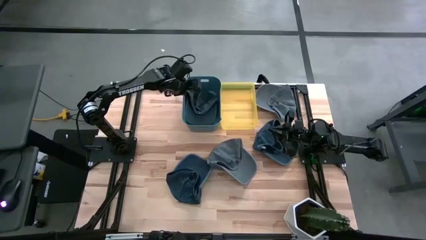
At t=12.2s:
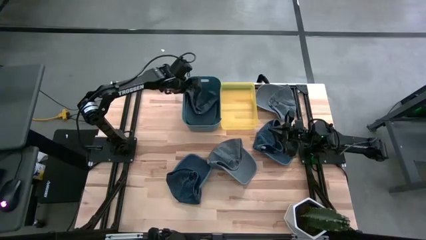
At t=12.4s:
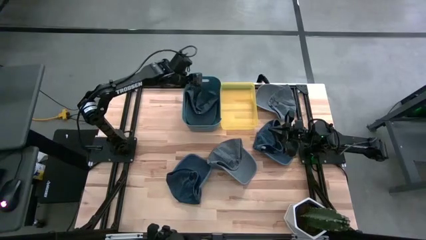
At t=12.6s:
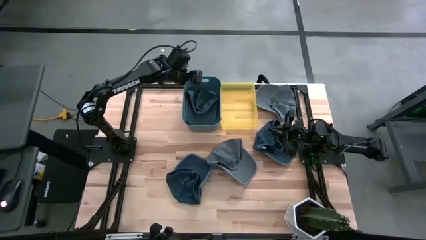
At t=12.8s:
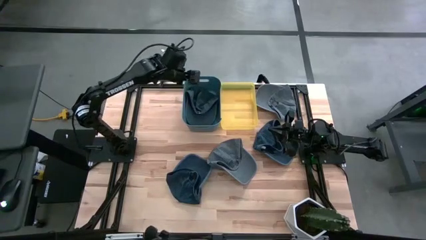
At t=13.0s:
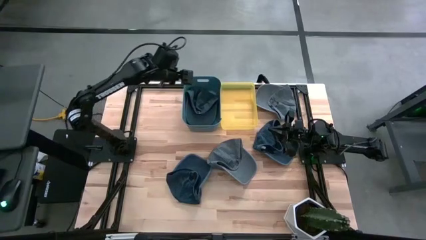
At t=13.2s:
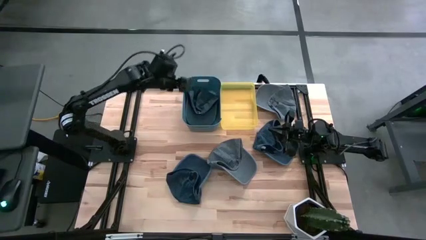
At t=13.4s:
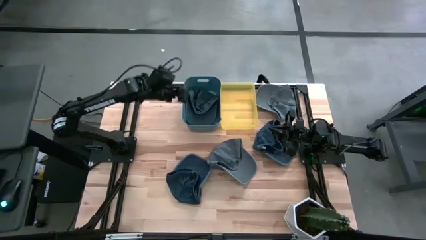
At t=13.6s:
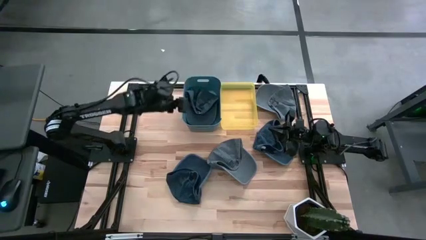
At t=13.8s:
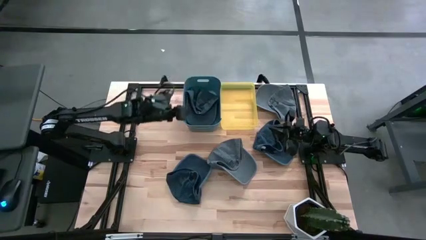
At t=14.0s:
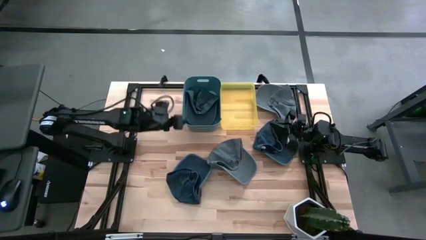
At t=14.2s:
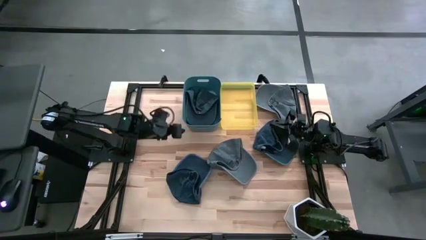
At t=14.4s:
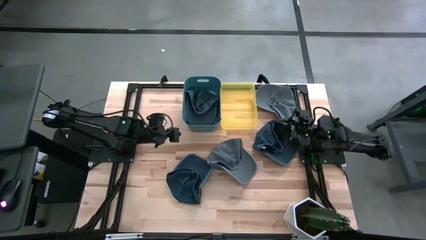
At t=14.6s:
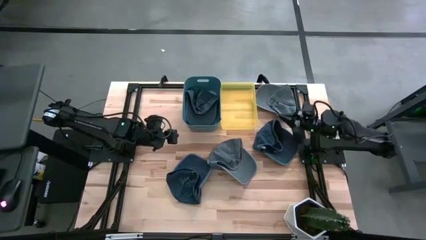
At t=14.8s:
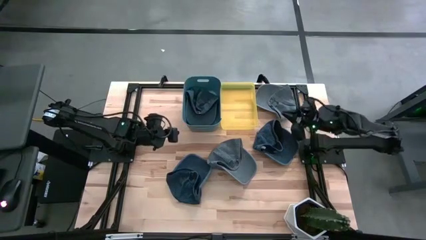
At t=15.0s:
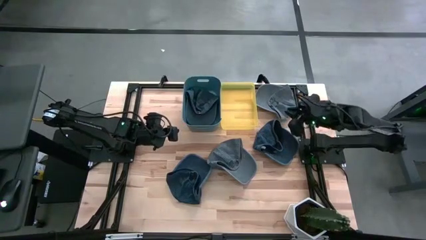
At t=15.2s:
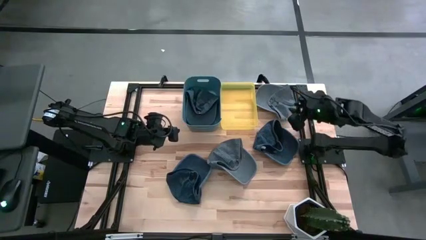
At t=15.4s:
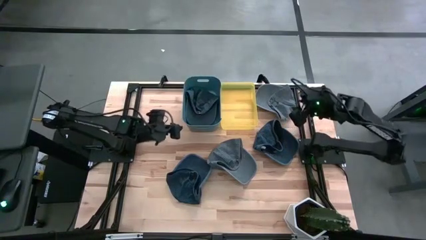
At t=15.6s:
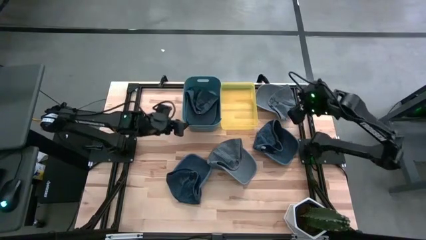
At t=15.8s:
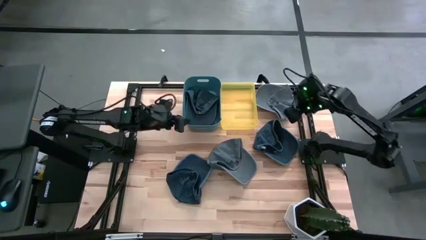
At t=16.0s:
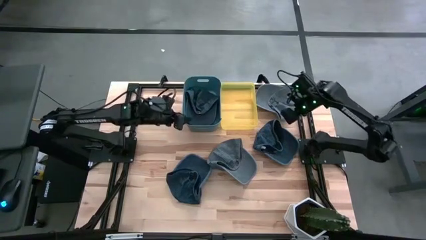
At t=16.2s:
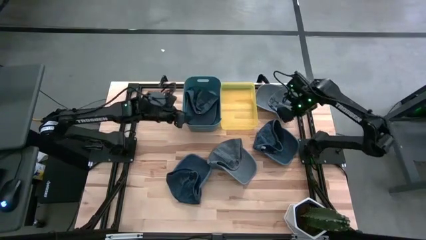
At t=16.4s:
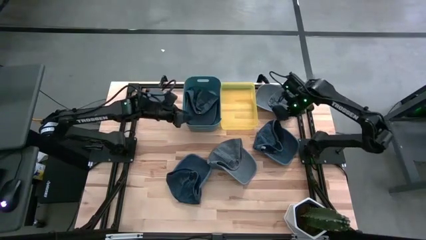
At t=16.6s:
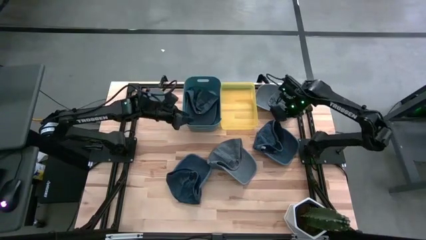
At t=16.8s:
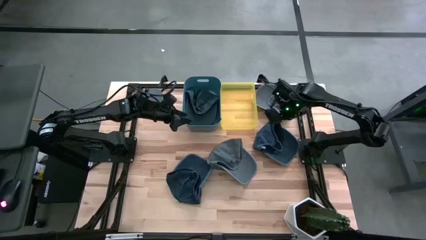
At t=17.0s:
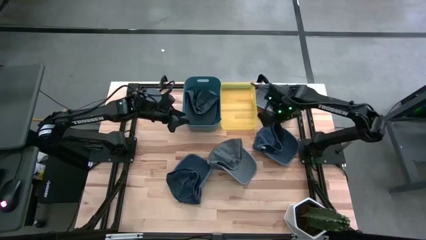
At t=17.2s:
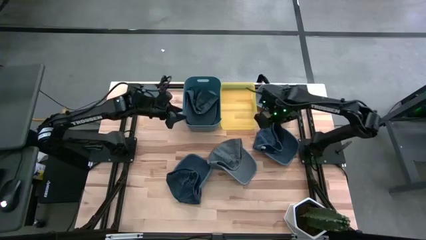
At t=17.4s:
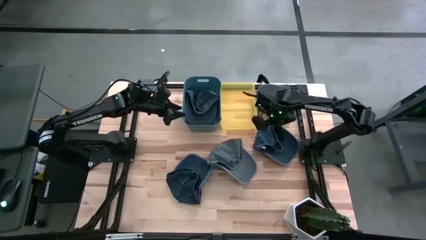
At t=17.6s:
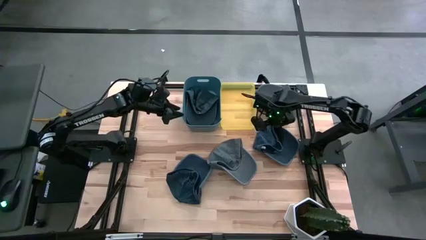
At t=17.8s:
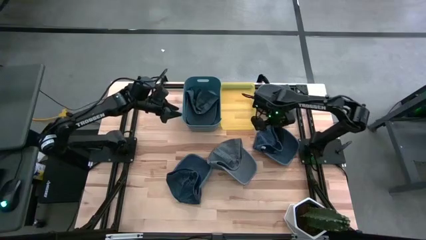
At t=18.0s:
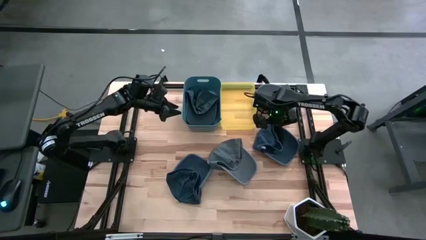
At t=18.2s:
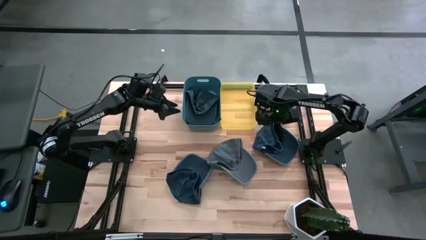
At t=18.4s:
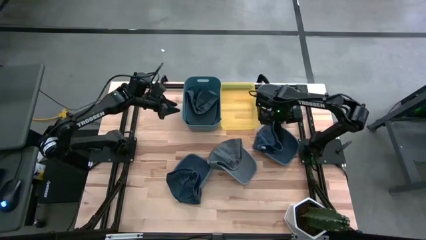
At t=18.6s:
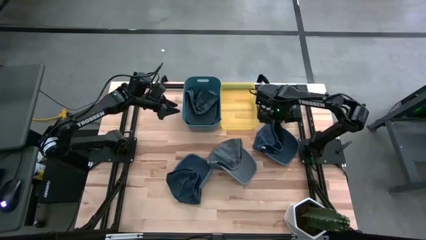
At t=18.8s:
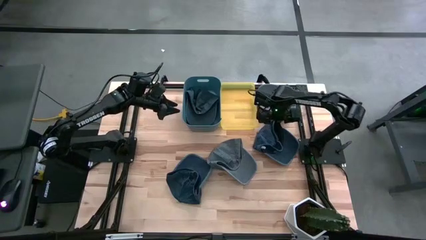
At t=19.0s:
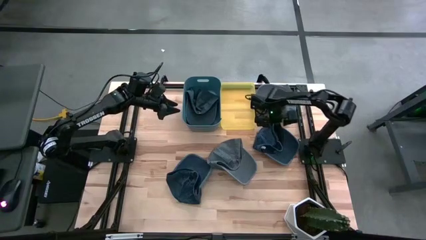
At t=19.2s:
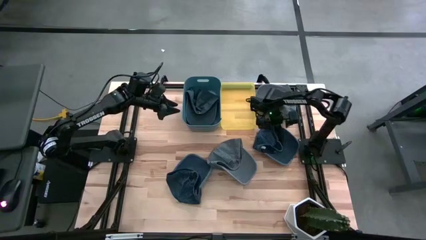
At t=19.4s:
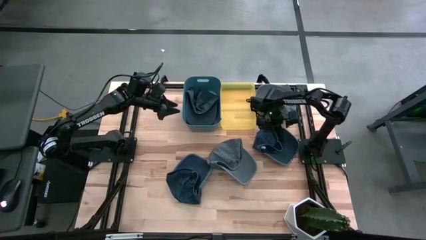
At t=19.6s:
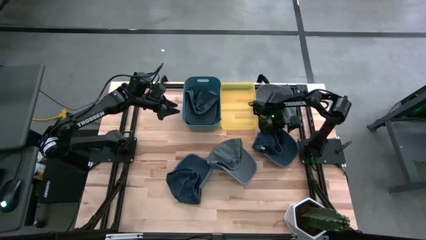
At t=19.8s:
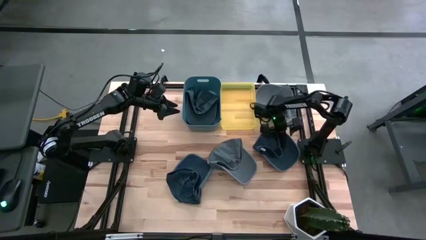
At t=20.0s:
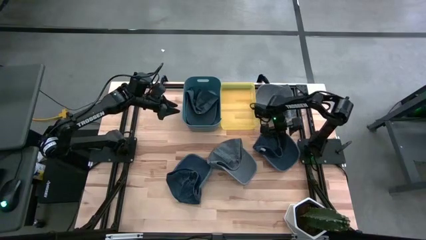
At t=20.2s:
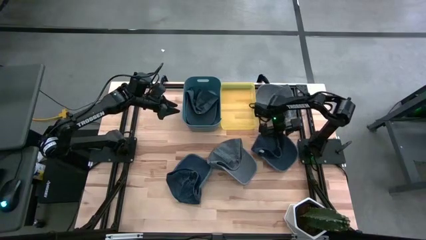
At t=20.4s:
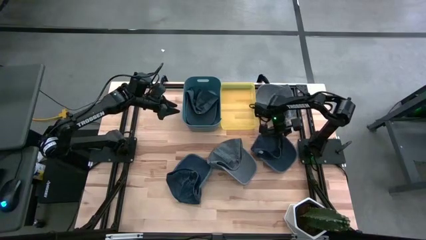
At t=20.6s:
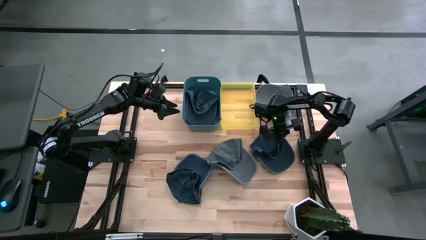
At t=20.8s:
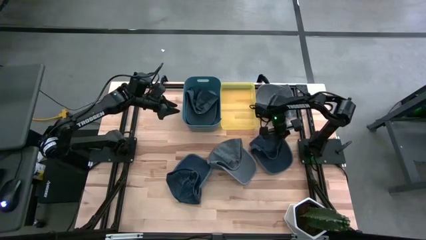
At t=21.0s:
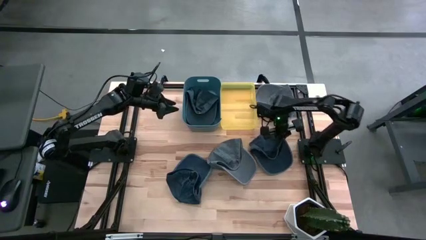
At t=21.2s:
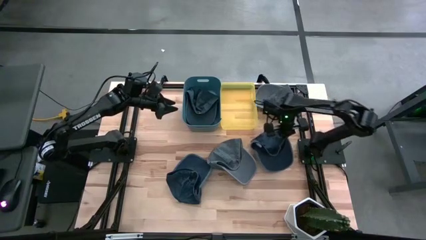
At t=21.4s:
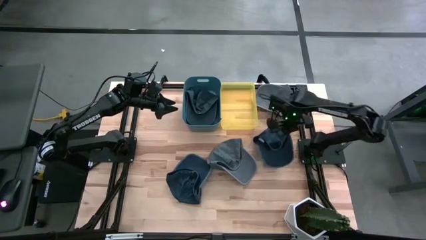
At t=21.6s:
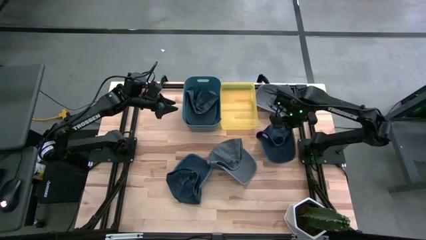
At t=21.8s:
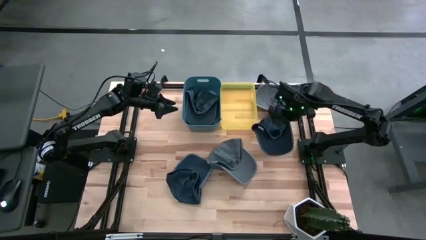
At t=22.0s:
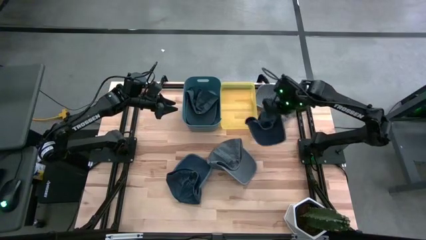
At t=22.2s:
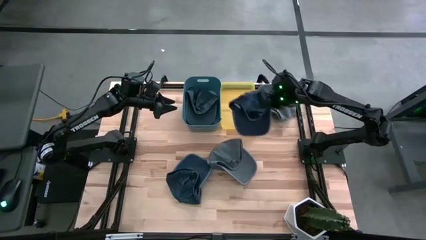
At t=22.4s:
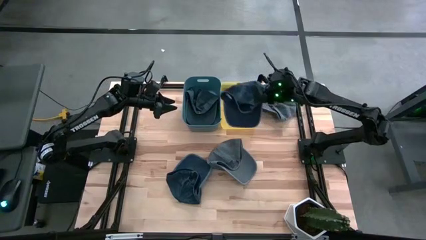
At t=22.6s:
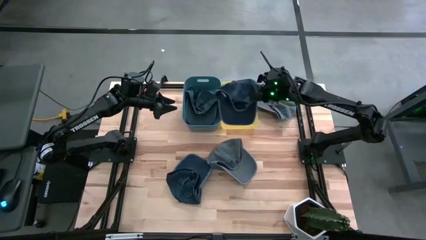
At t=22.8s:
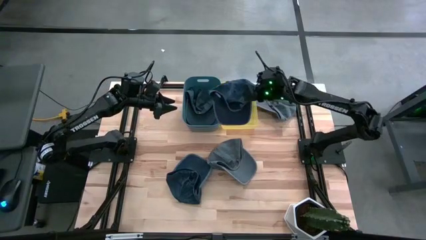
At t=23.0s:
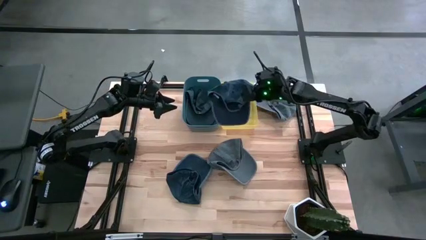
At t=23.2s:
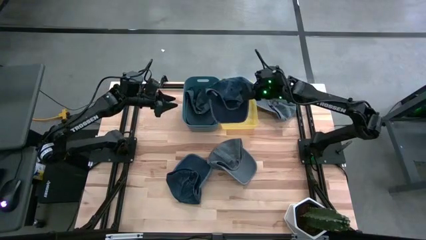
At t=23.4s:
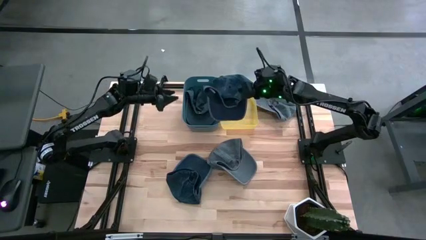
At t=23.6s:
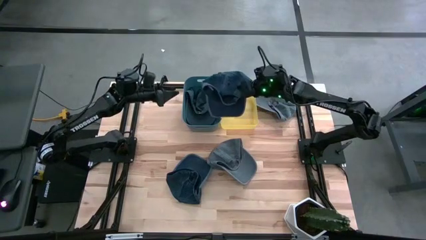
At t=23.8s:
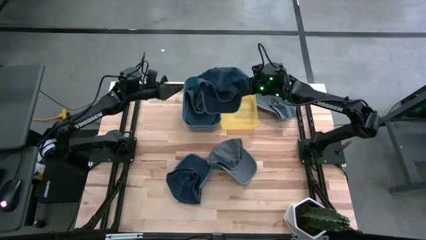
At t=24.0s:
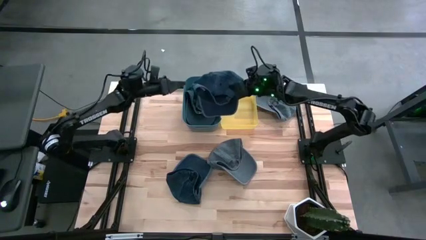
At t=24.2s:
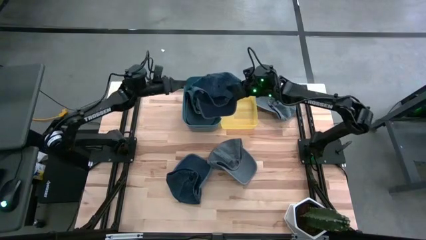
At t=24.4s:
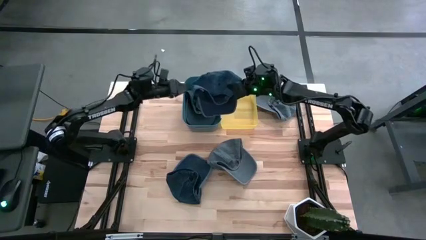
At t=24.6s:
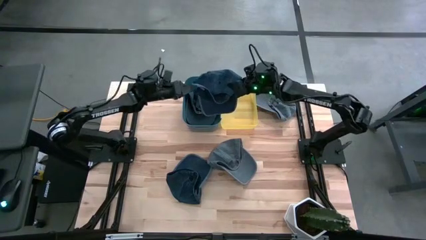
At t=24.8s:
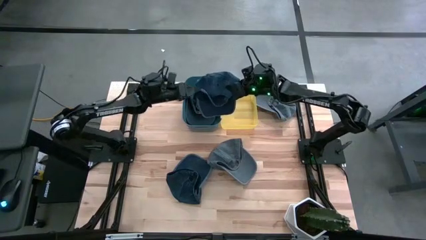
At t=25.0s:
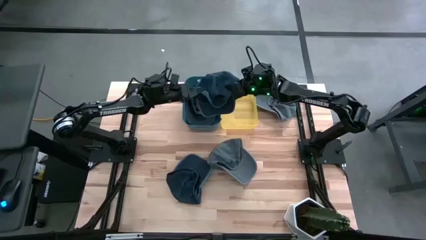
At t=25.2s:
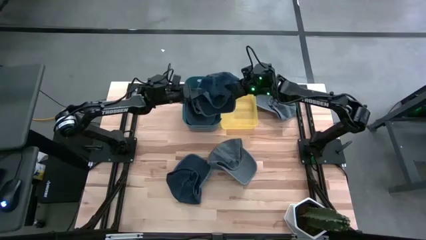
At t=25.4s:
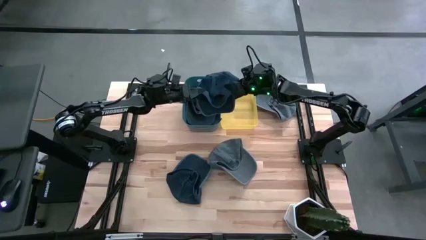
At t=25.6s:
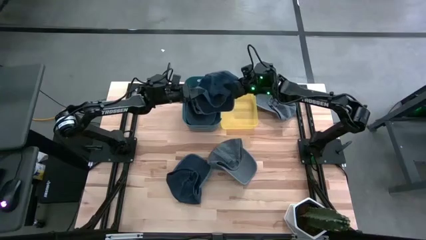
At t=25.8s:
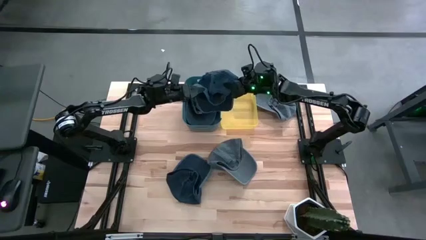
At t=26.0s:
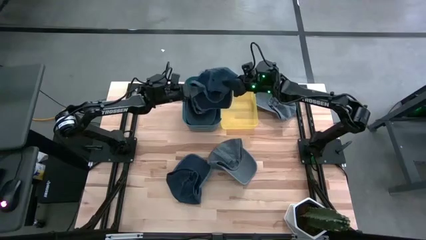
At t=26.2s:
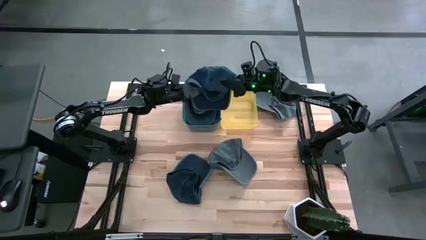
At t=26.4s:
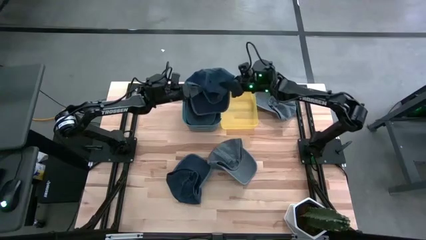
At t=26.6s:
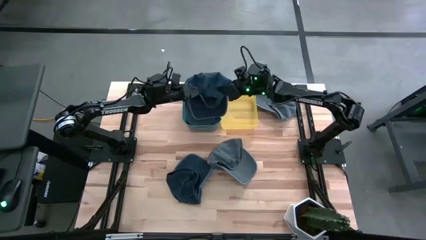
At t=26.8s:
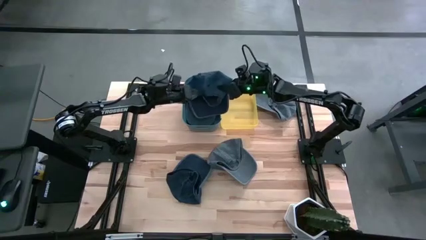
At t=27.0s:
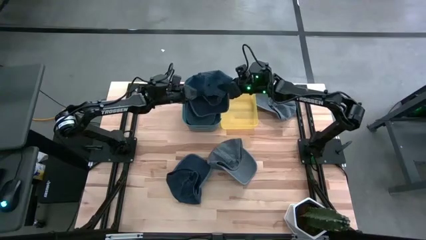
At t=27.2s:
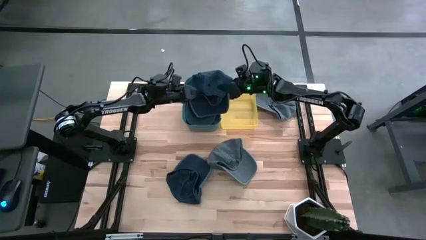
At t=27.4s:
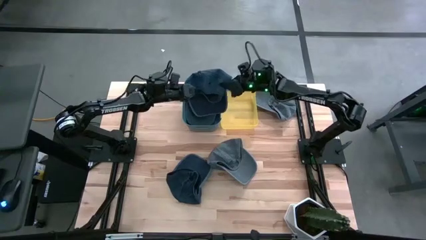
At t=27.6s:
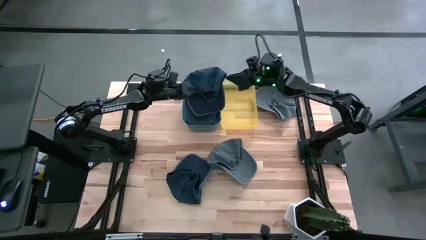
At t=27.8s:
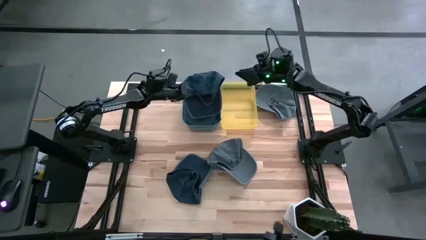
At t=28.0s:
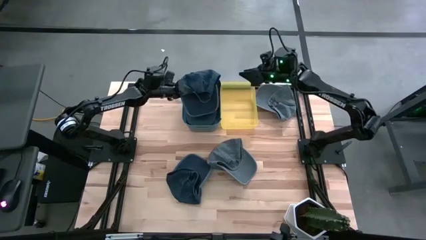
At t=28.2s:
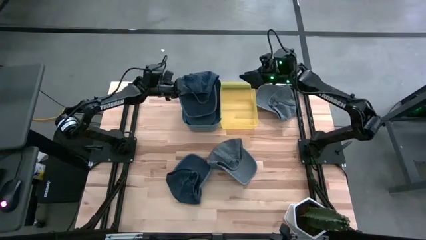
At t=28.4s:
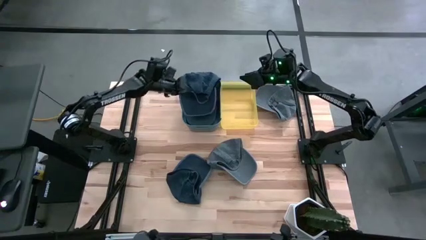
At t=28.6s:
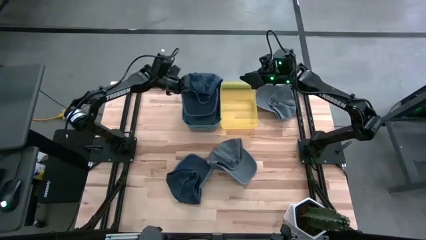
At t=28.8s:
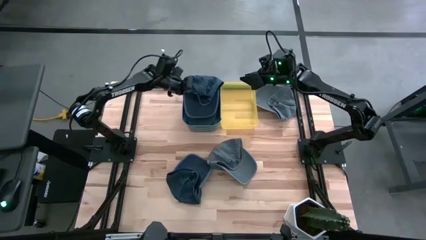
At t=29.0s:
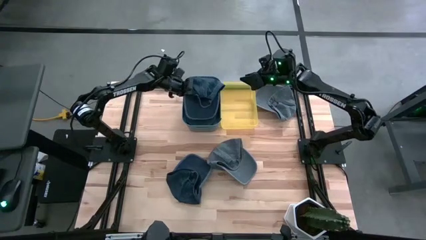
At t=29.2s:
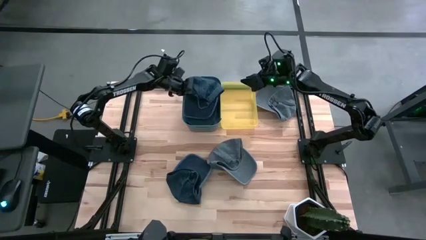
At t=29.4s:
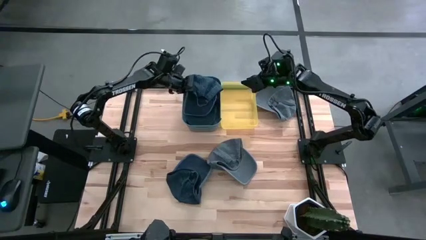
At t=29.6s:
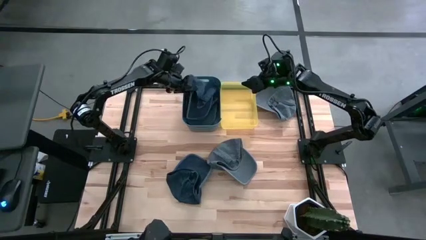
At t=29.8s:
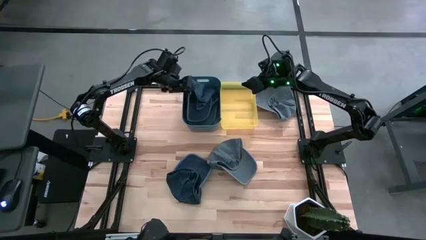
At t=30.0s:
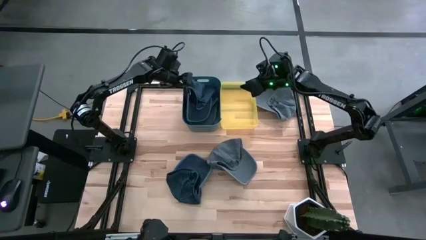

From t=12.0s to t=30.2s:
Task: Pick & Place hat
Put the top black cap into the blue bin
